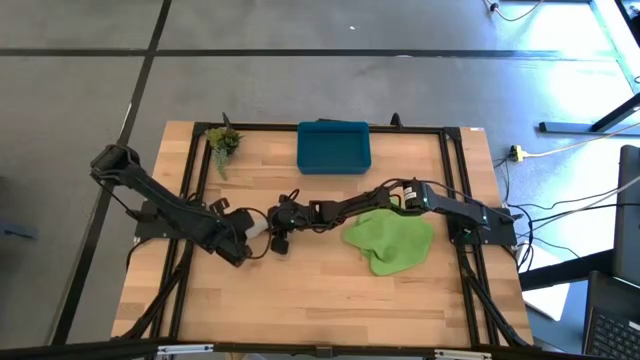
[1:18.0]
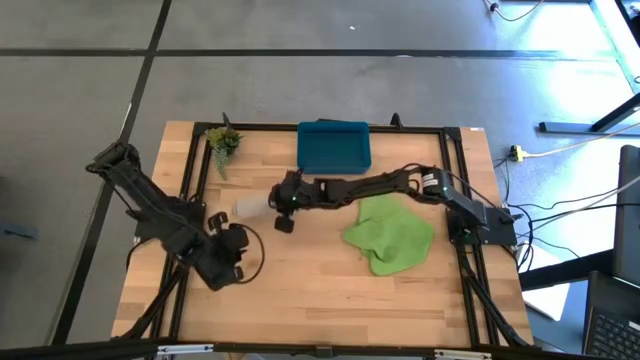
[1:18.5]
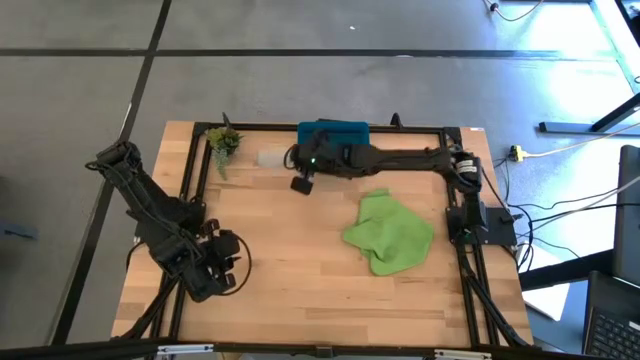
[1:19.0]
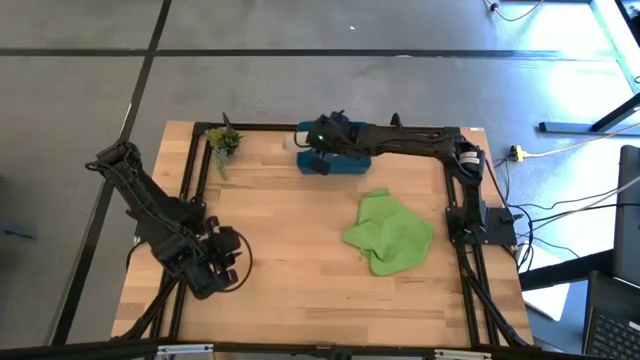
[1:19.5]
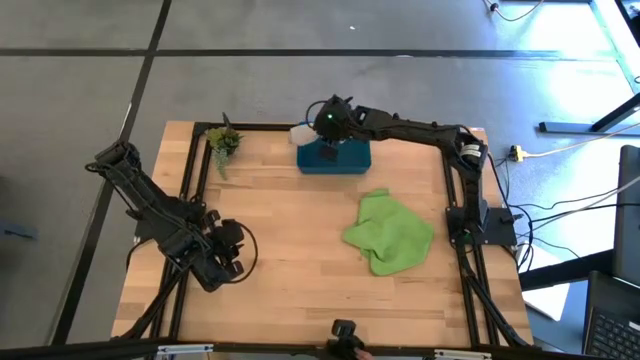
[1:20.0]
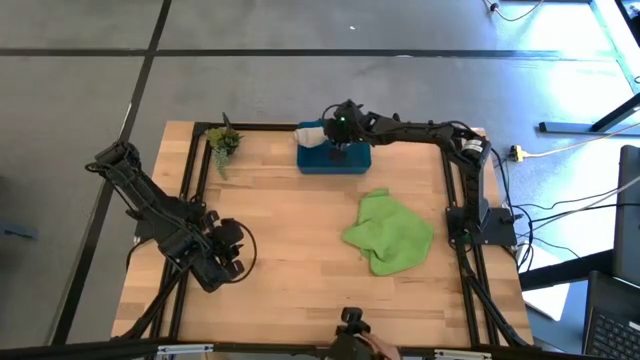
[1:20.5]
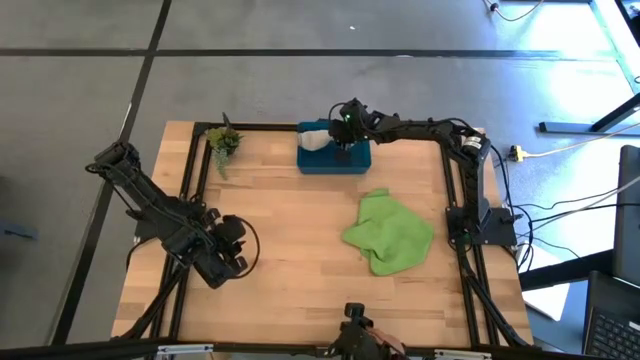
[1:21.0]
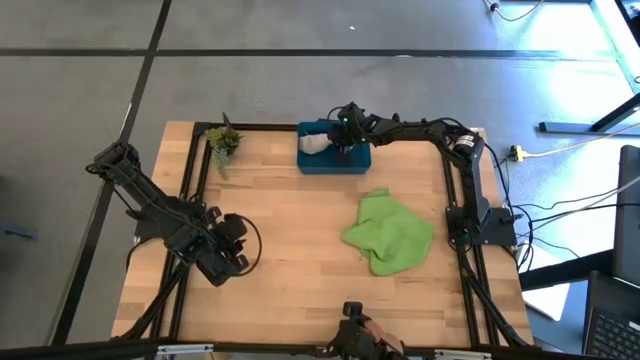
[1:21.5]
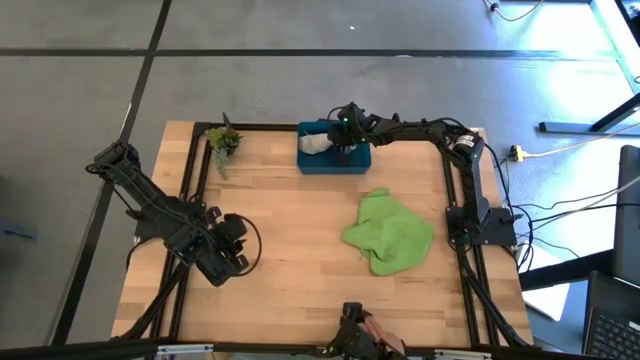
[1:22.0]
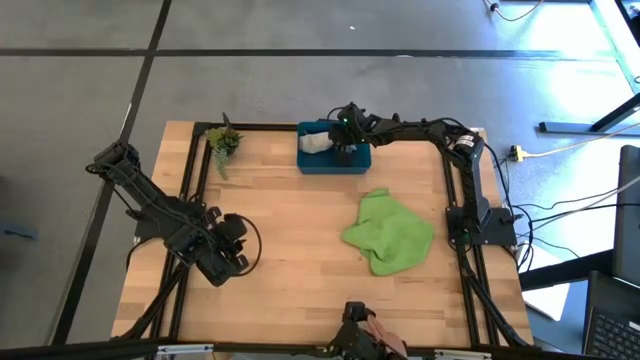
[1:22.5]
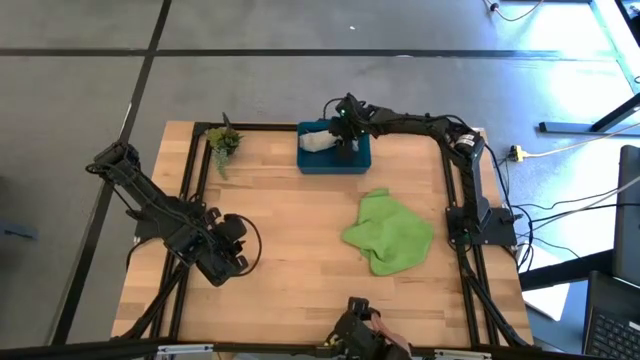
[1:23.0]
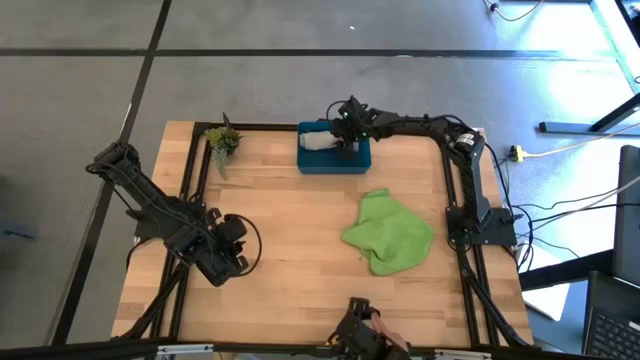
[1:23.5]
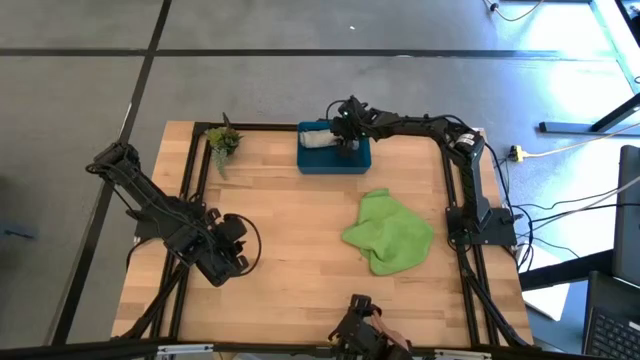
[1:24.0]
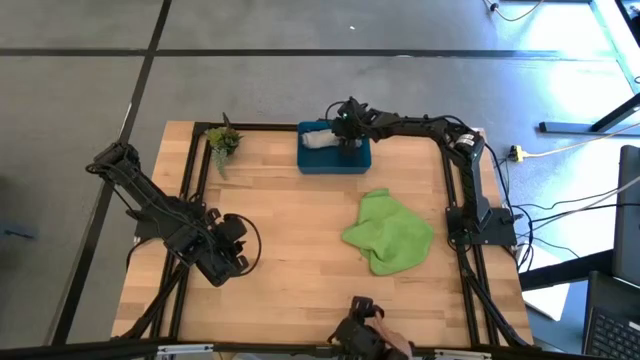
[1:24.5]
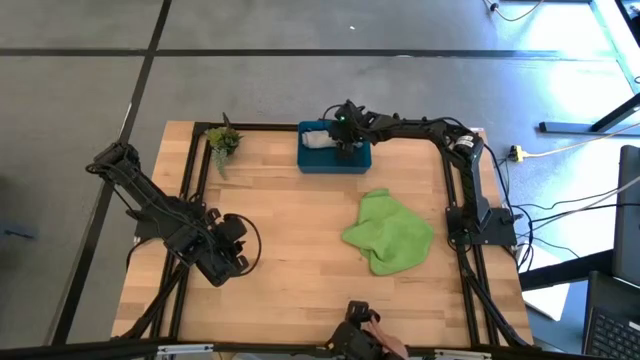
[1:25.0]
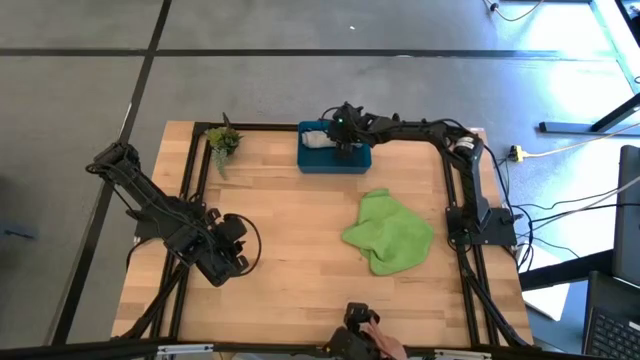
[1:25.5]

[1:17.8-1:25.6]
Task: Roll microfiber towels into tight, uniform cylinder then place into a basket
Put the gray rolled microfiber cloth into the blue bin

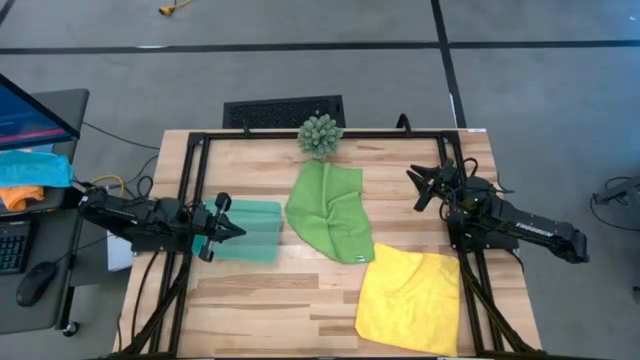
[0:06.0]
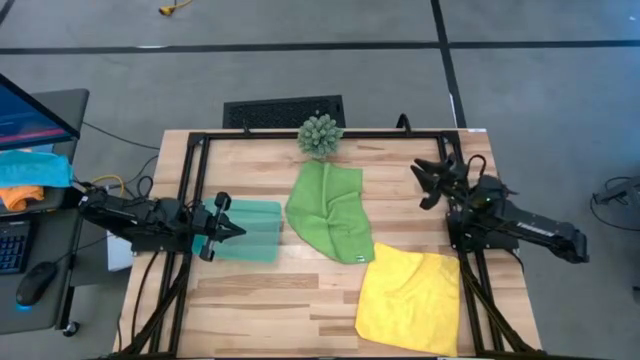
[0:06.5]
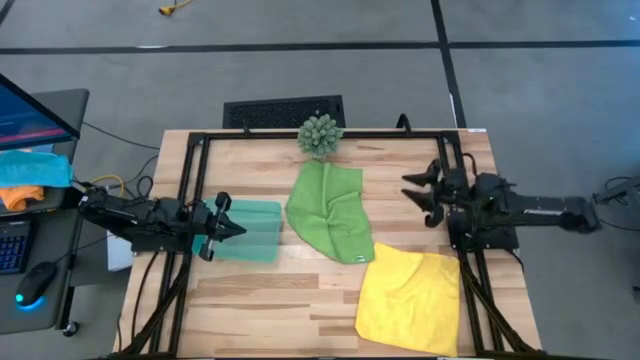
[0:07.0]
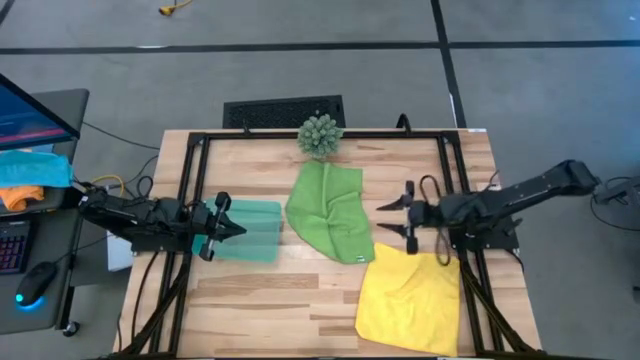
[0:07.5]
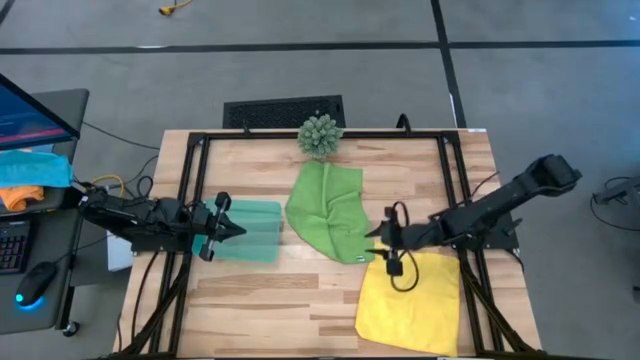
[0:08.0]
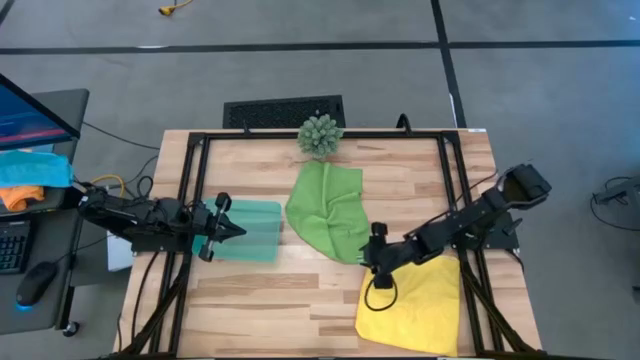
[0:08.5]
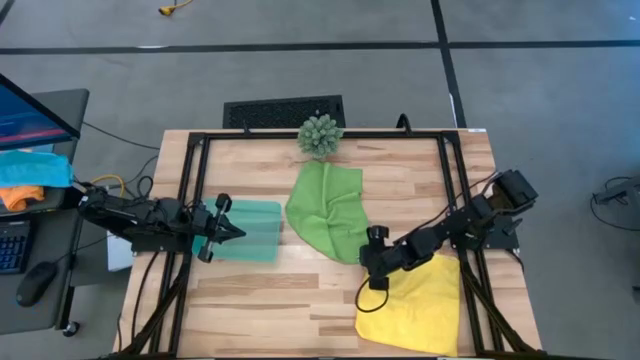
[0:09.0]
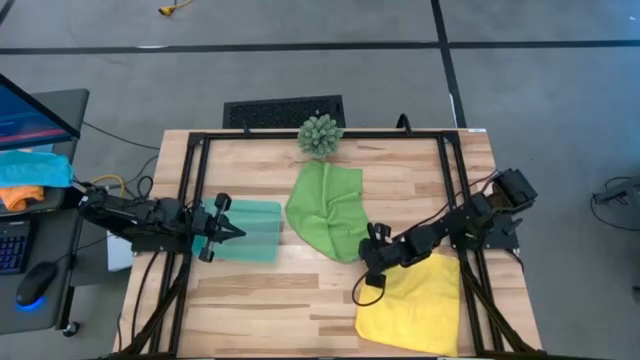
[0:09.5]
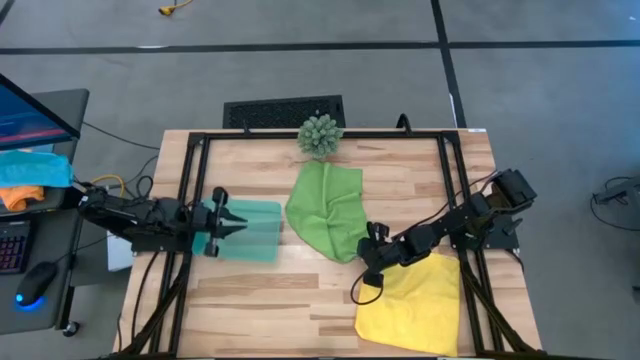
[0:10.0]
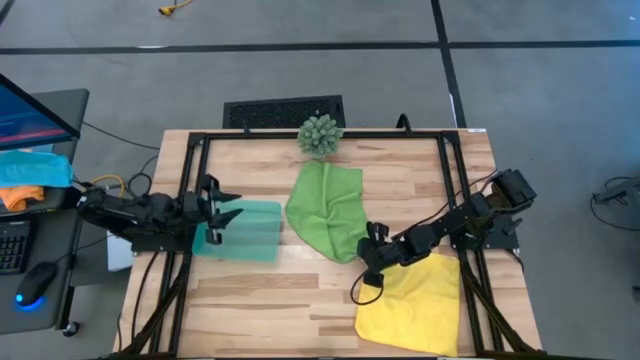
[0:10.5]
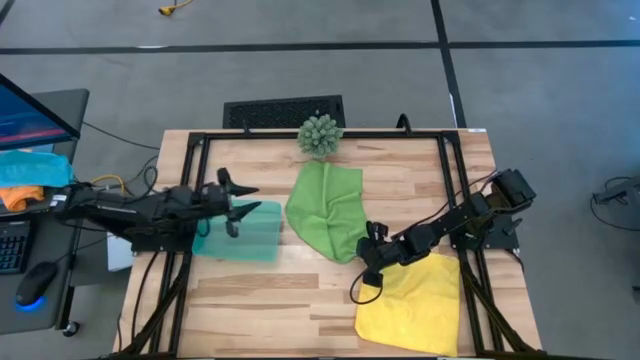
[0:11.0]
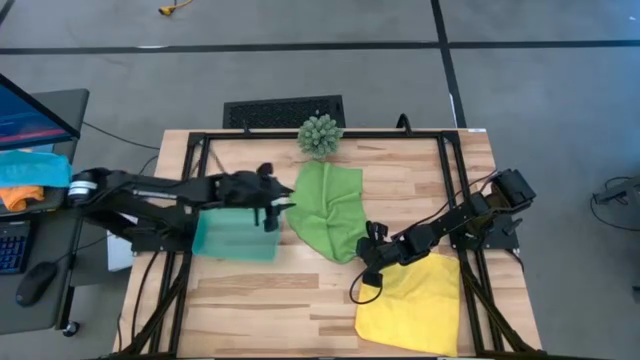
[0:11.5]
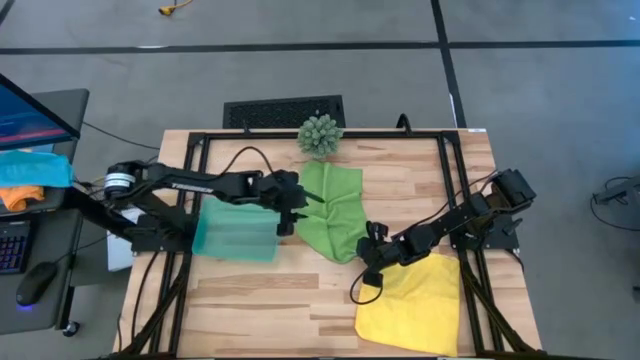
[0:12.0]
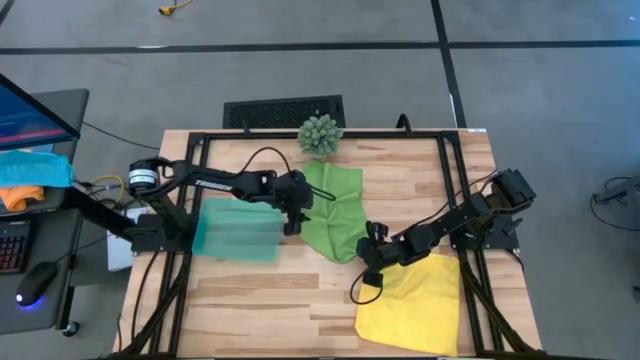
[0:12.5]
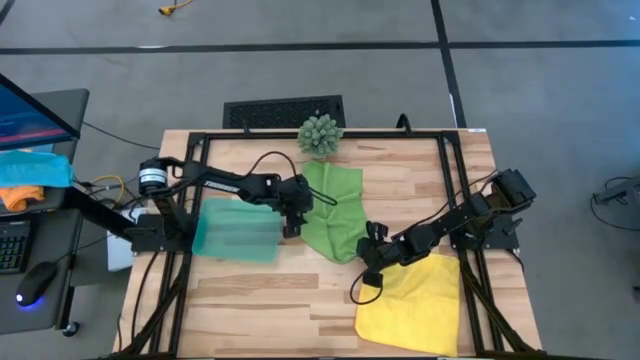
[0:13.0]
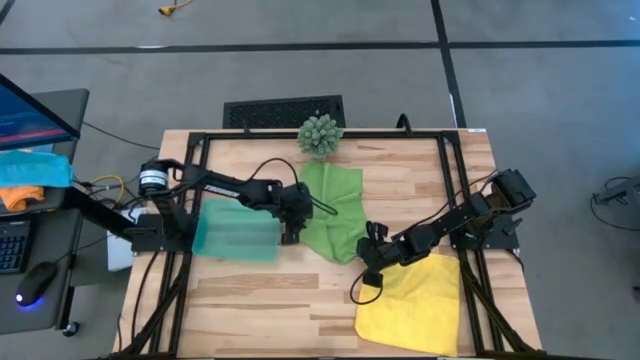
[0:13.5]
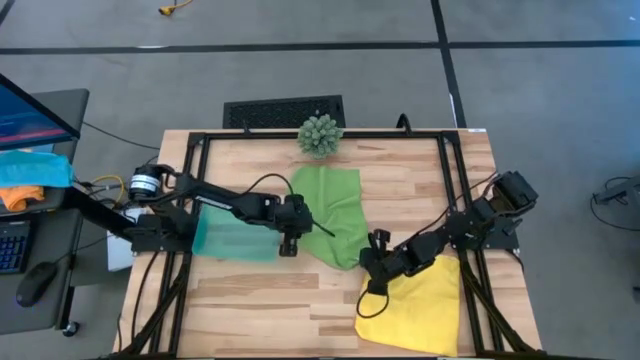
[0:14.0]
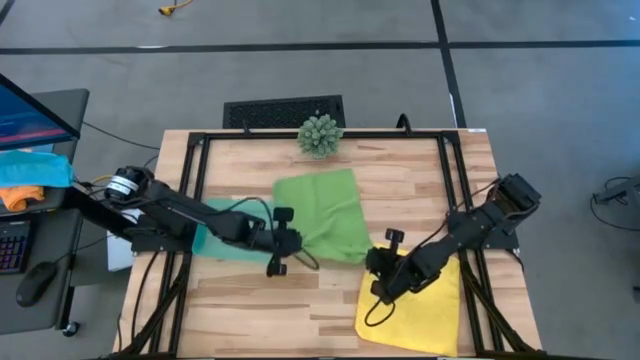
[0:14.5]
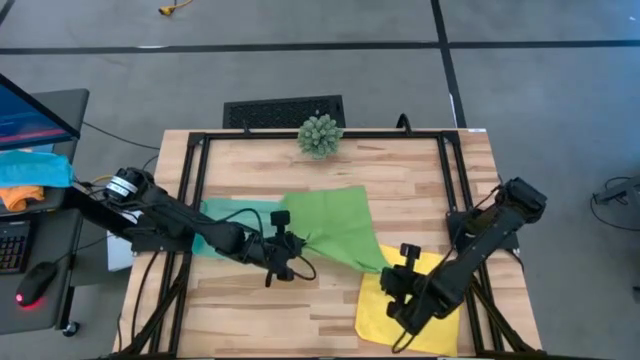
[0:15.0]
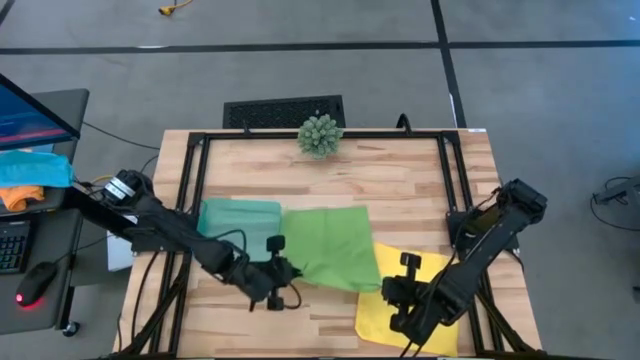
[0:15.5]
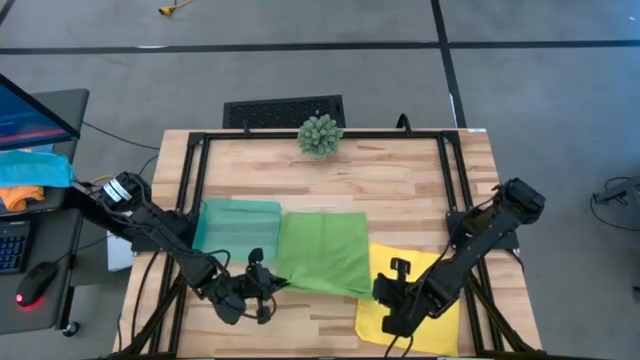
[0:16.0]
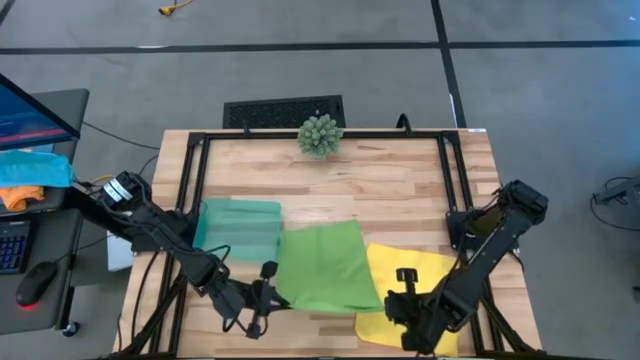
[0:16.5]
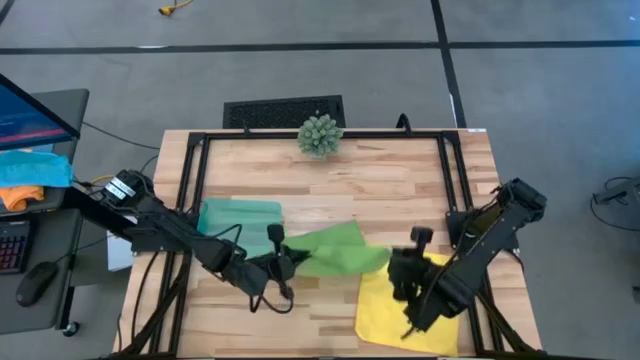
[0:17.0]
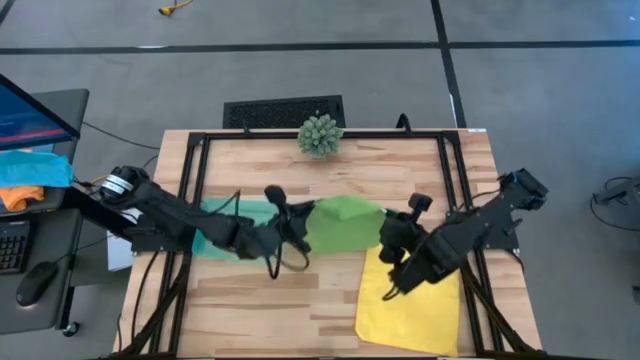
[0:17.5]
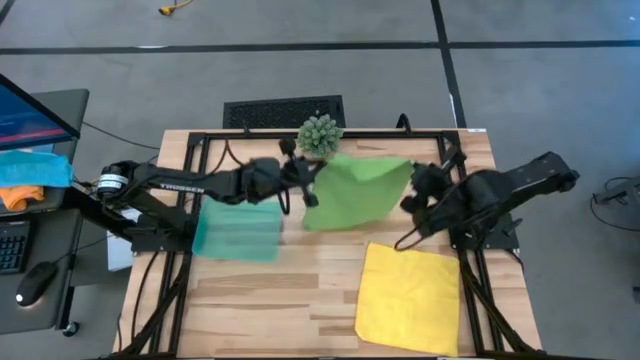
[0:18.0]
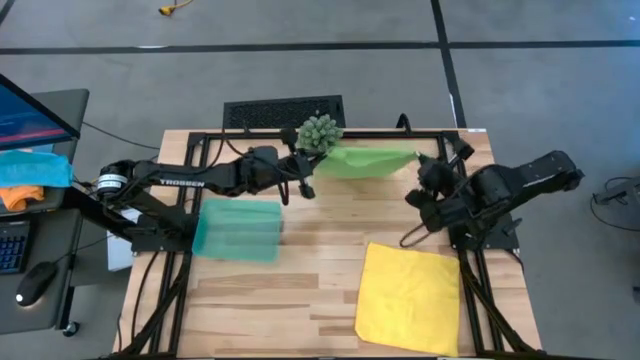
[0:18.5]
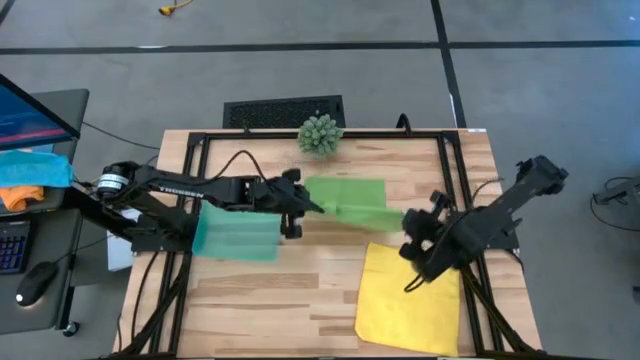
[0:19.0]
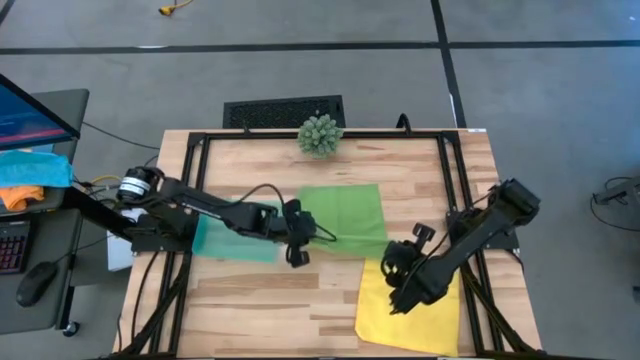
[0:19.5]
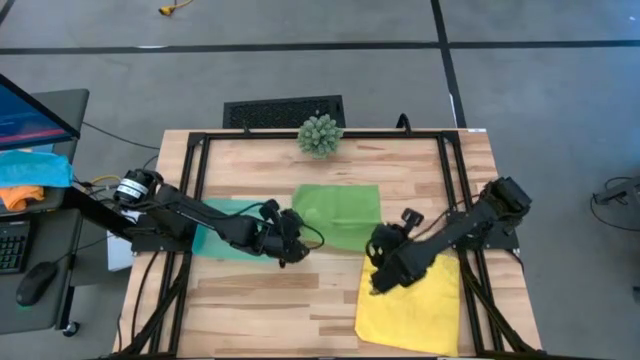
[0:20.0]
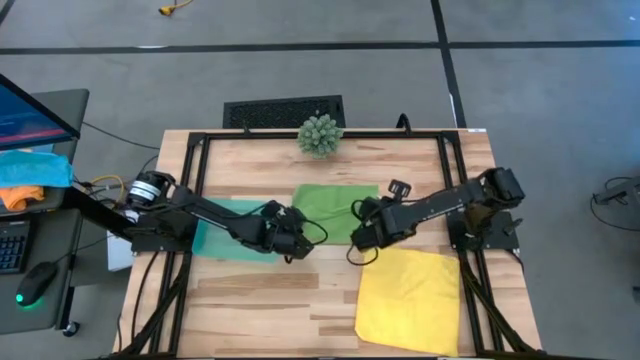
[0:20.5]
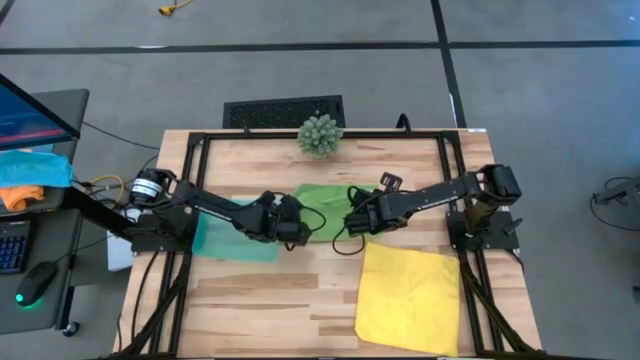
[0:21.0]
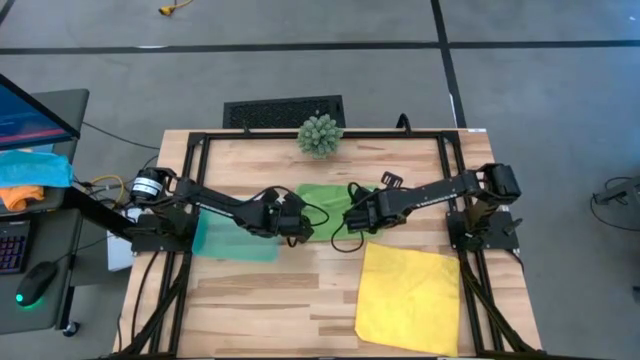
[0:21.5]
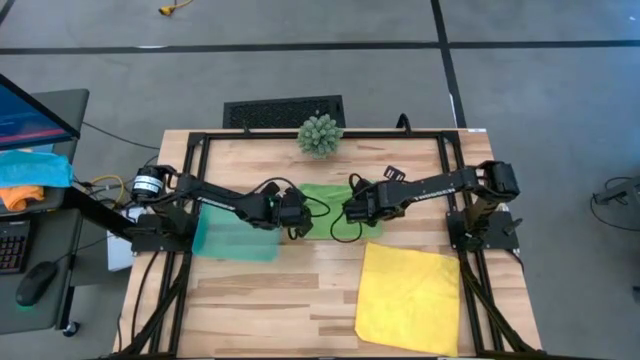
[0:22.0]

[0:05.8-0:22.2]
Task: Roll microfiber towels into tight, uniform cylinder then place into a basket
Fold the green towel
